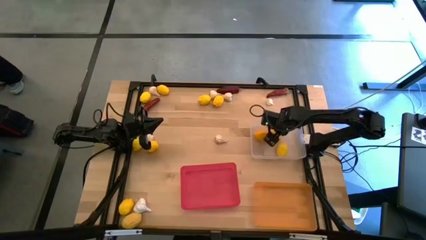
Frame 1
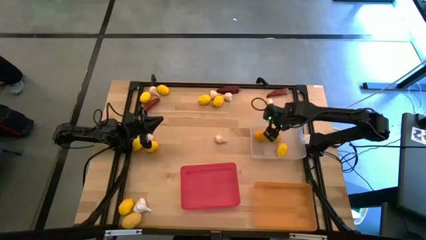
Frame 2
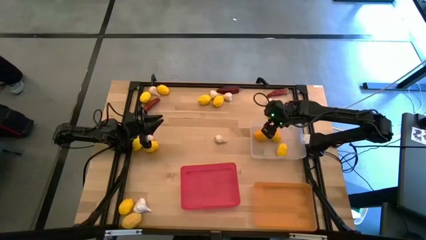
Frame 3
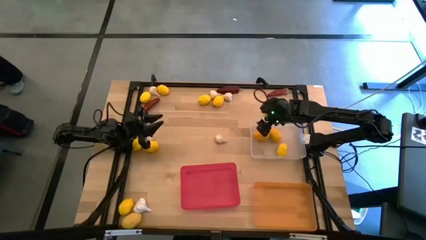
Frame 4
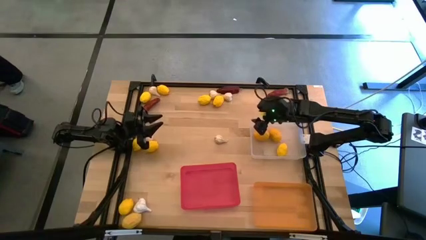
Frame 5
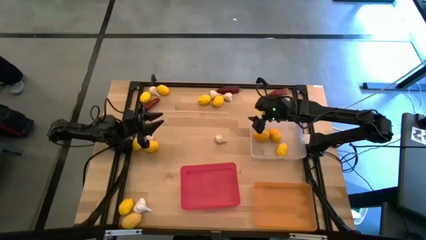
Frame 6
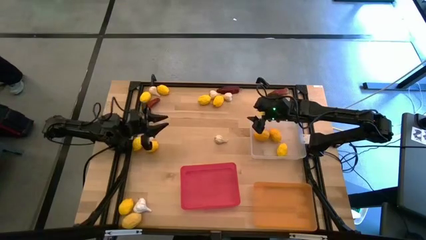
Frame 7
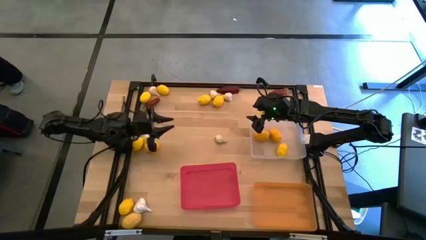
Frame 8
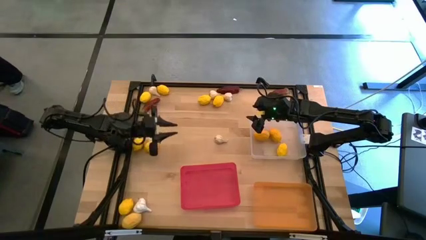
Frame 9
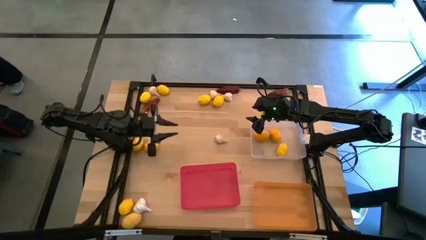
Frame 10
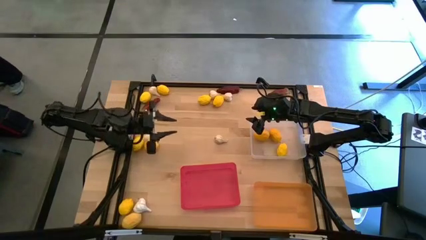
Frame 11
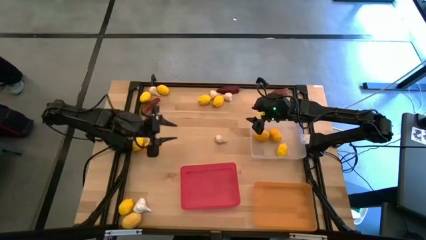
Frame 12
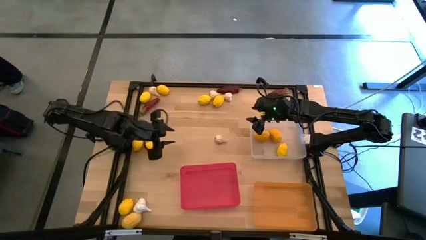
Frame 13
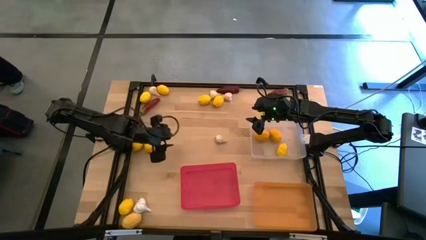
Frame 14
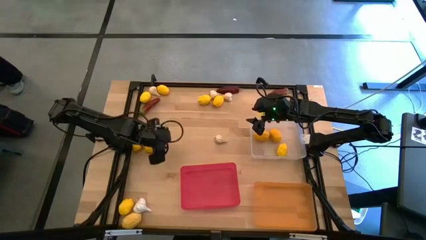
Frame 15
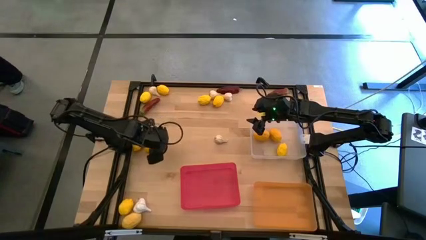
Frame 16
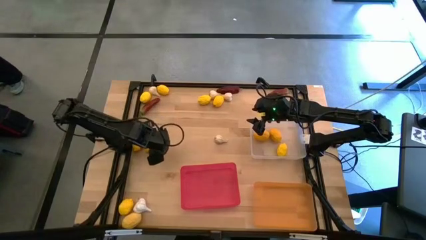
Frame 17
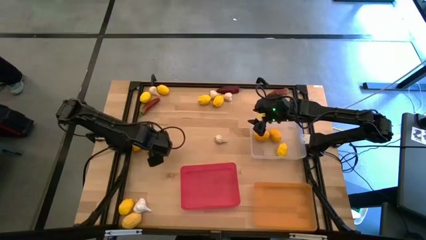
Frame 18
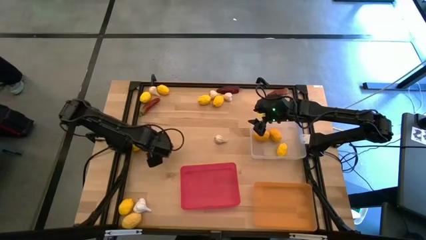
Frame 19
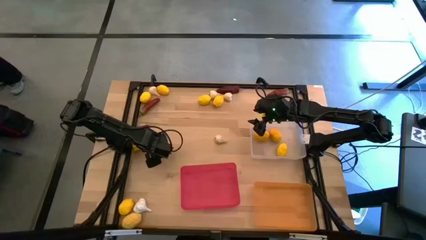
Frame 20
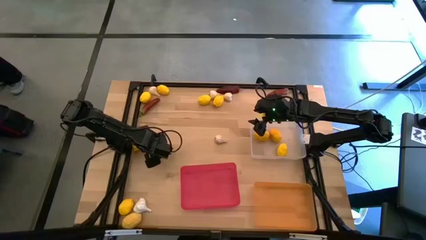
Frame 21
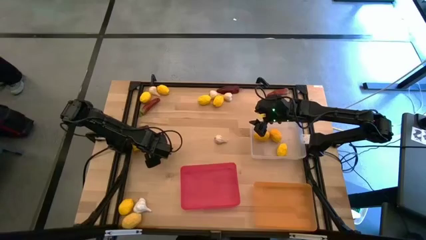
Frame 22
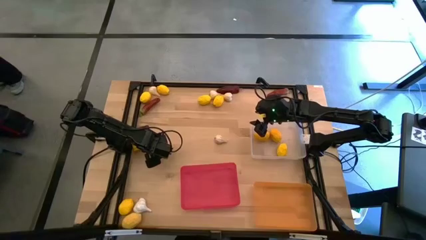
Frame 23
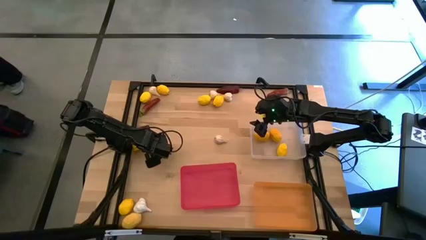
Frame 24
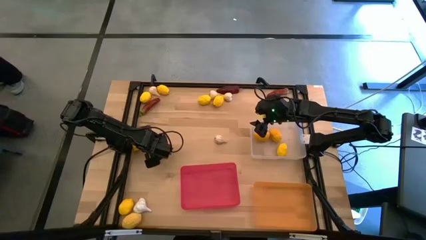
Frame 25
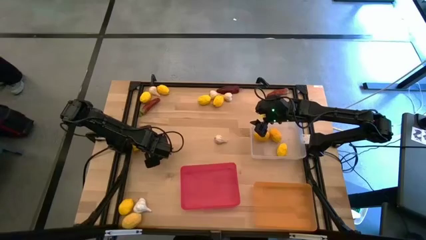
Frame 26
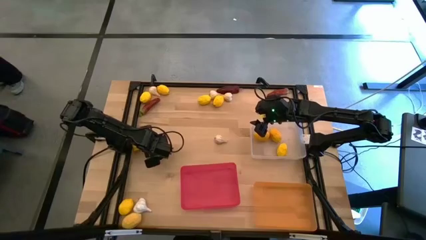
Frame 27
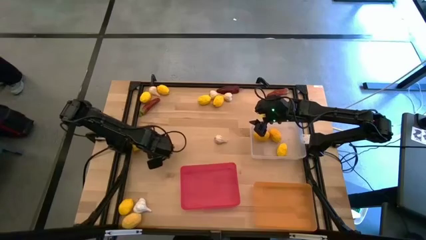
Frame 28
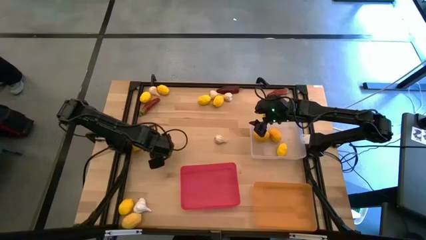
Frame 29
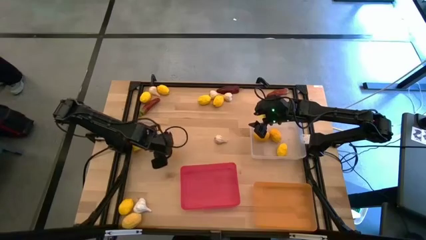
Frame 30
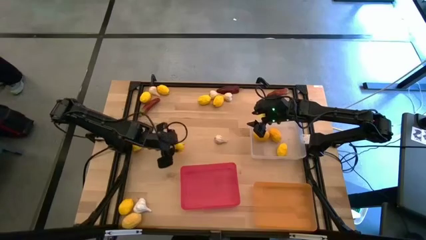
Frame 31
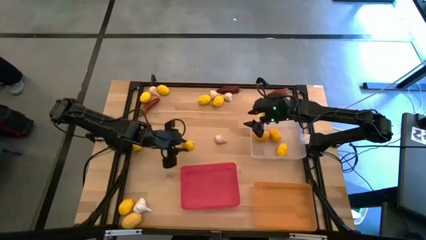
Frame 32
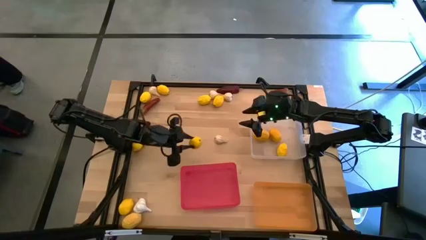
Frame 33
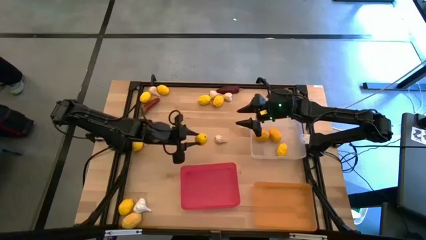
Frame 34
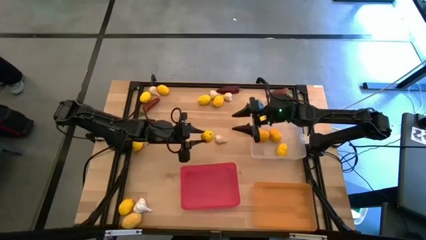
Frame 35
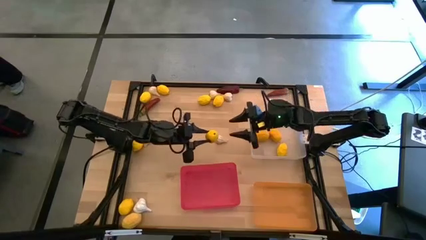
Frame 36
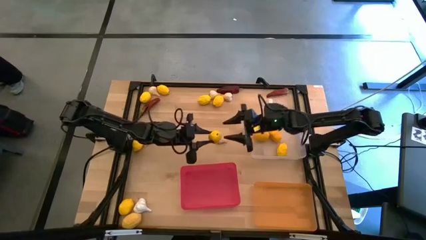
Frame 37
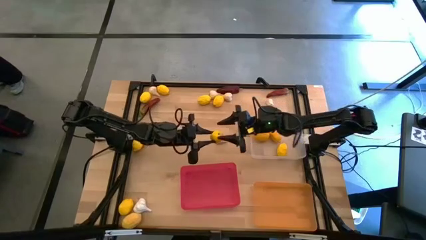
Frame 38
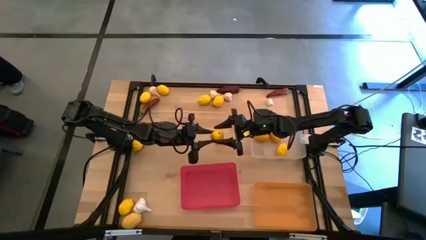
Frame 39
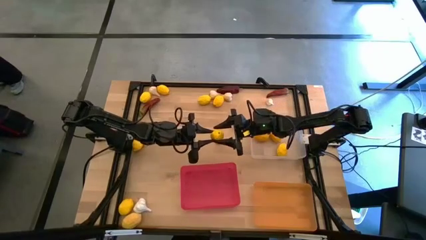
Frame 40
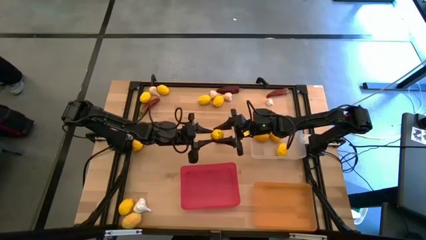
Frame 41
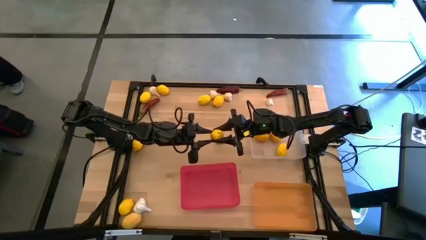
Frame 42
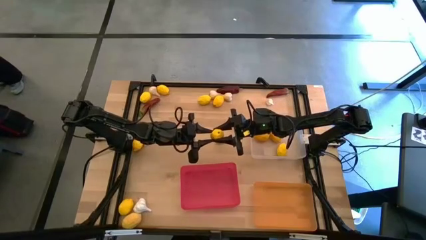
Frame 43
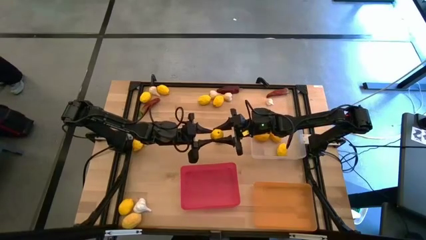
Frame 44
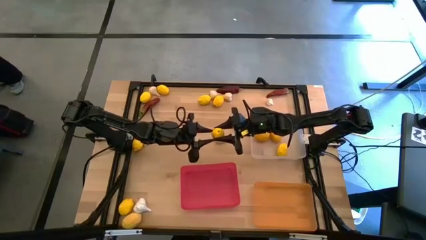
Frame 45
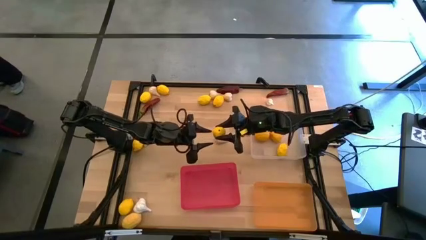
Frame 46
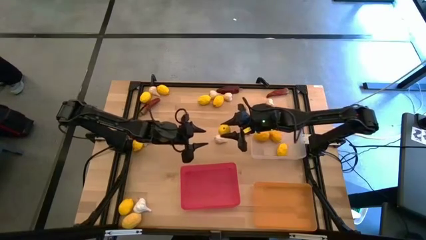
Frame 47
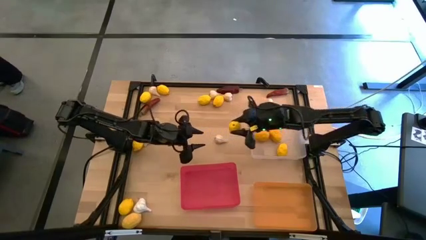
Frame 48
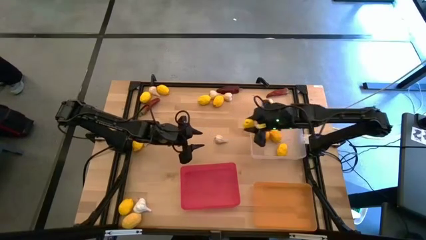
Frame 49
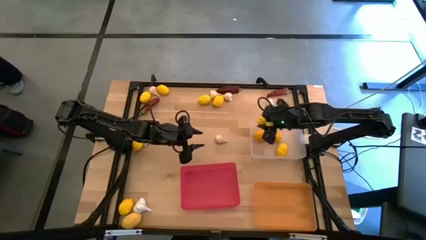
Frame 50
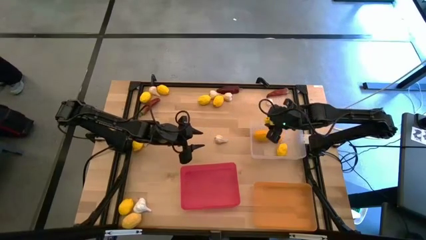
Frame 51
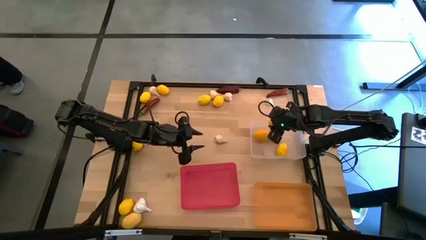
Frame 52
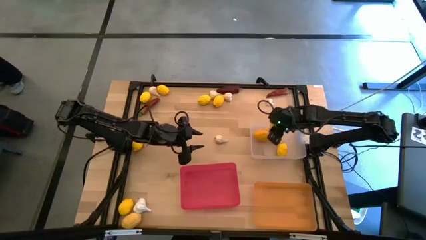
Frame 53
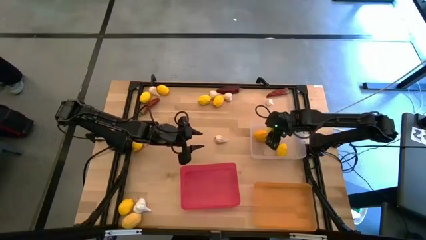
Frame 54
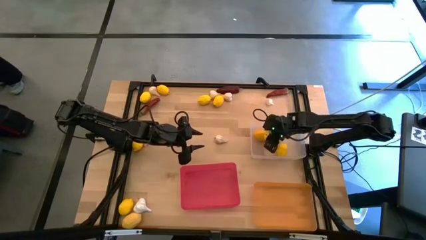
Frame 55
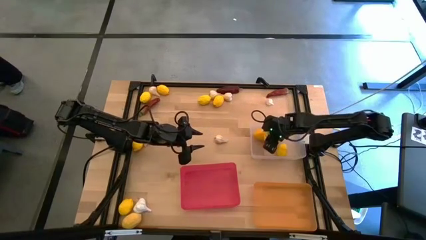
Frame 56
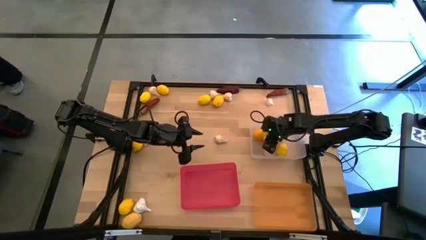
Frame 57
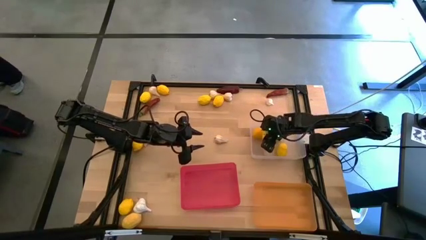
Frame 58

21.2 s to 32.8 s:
Task: Sort produce into baskets
Put the yellow lemon into the transparent bin

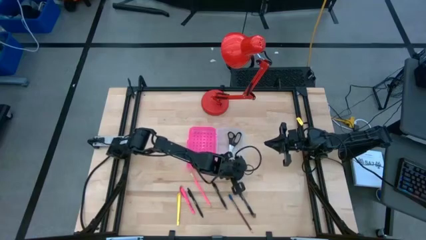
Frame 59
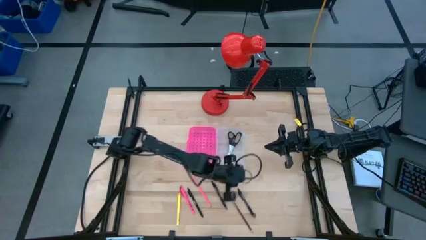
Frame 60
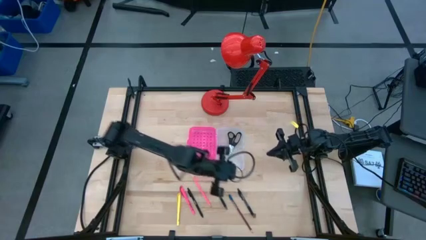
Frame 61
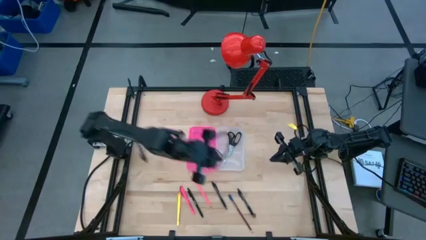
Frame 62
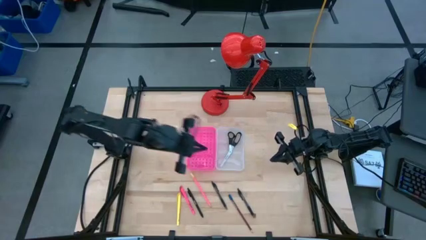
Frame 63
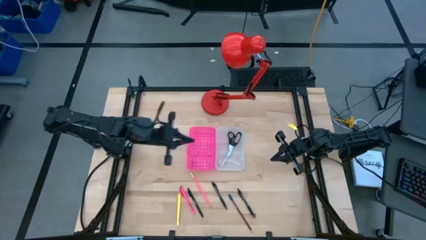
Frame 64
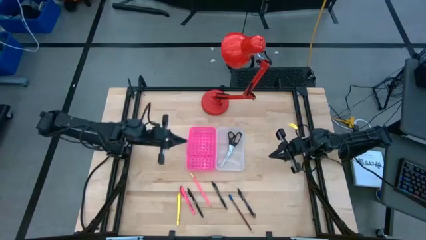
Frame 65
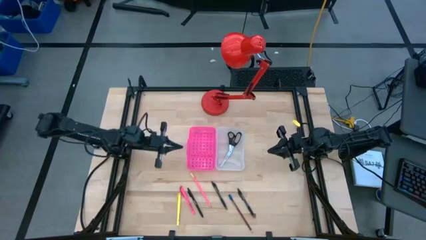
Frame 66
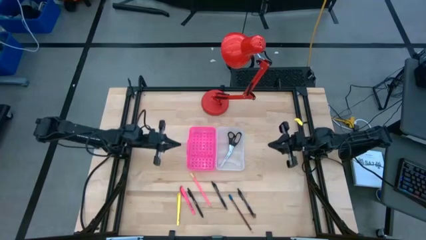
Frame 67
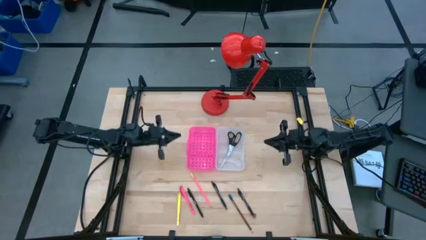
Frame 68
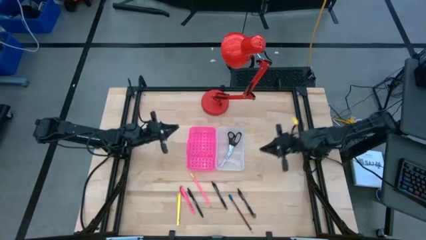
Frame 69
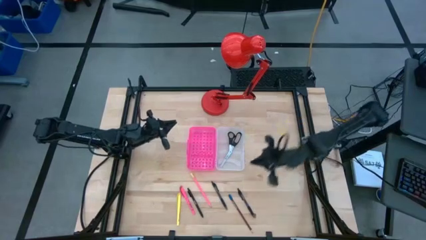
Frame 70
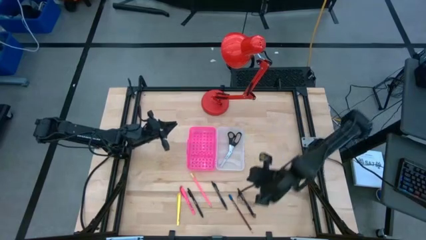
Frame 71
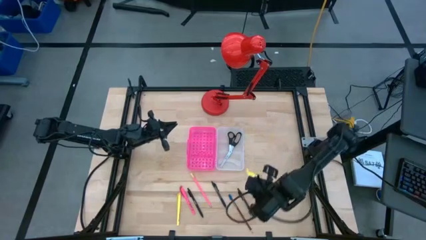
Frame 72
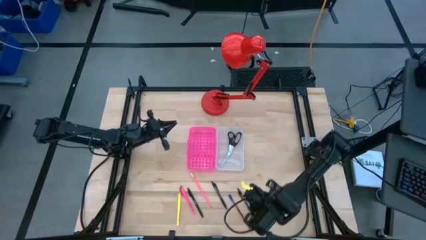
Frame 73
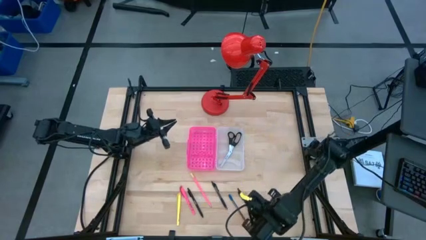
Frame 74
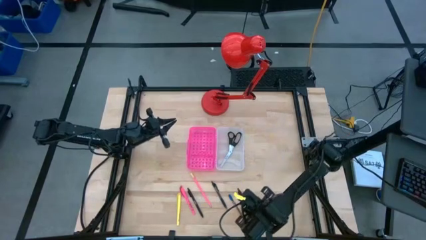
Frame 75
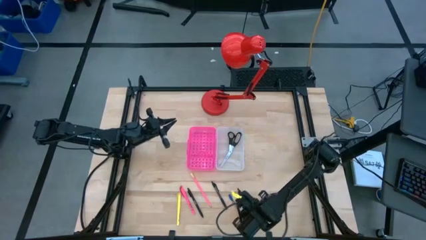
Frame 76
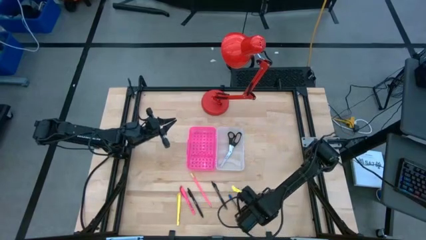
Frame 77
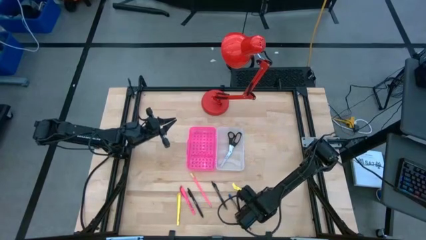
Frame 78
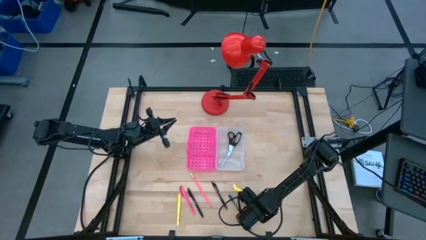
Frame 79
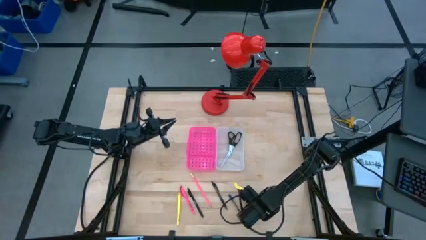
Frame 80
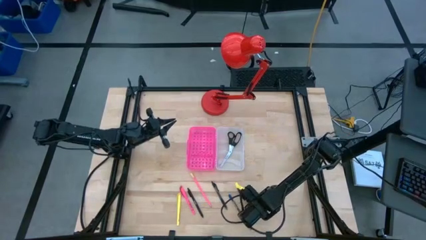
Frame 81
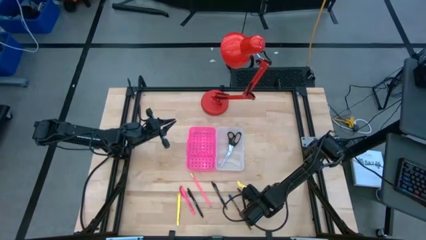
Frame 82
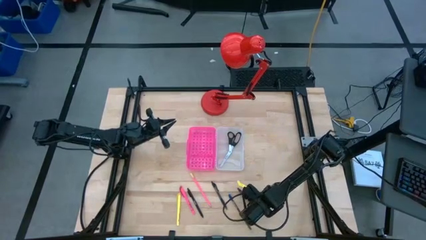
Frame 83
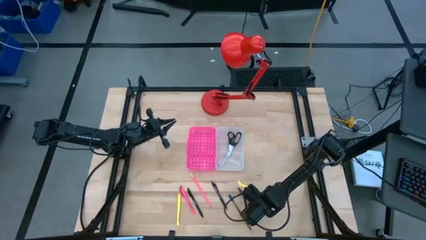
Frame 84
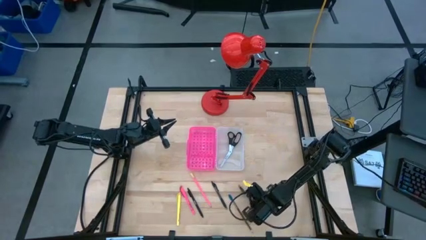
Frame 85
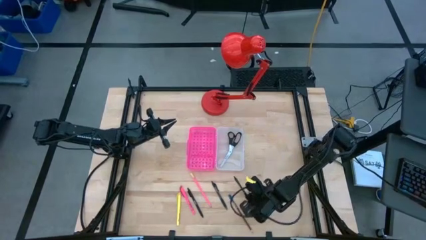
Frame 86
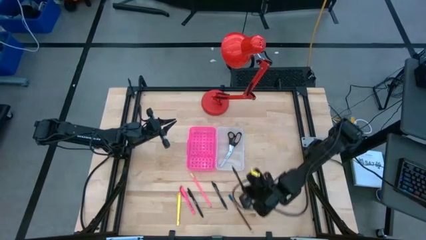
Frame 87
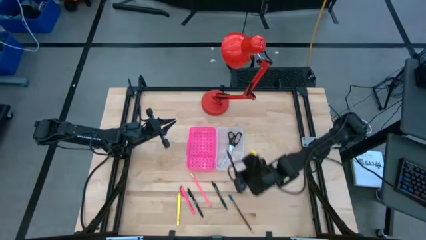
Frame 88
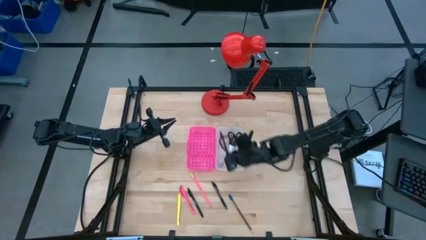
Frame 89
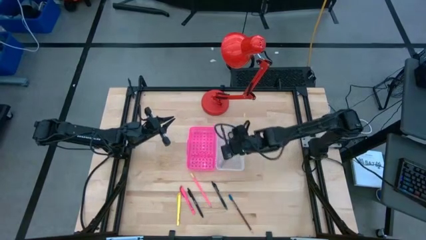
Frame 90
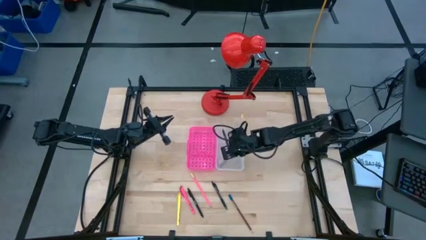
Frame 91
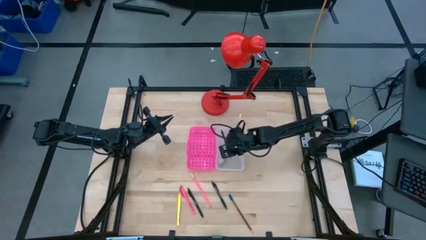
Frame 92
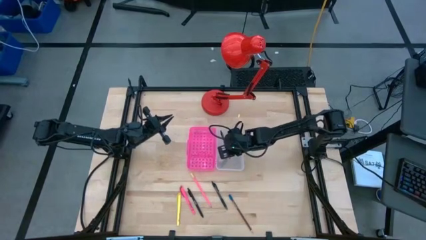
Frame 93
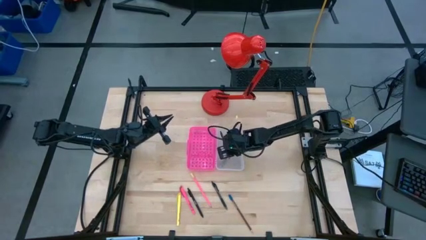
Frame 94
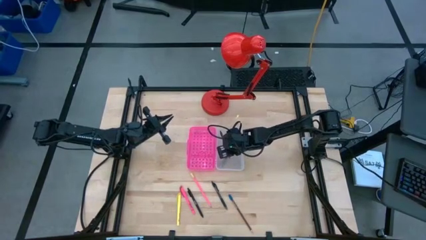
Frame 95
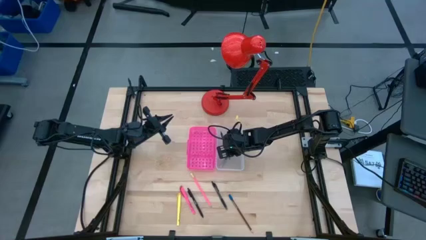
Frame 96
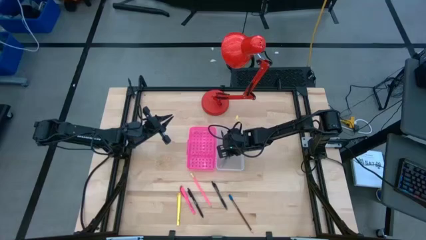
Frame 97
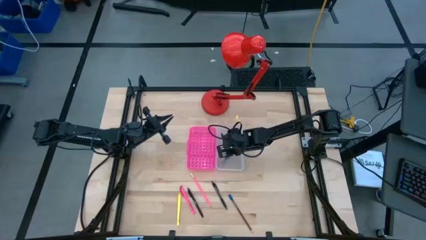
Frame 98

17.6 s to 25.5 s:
Task: Pick & place school supplies into a supply box
Put the right black transparent pen into the pink supply box
